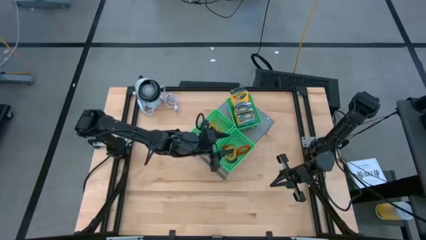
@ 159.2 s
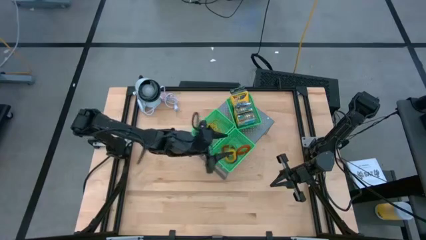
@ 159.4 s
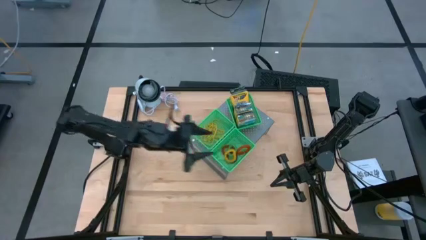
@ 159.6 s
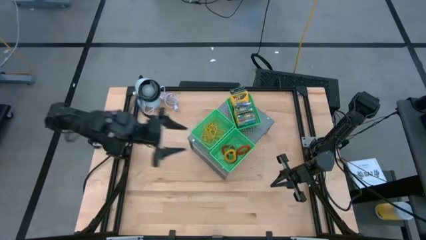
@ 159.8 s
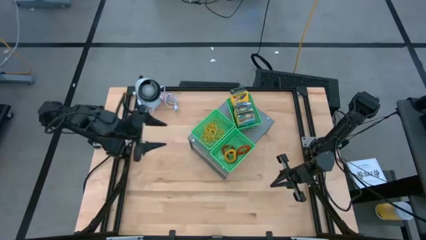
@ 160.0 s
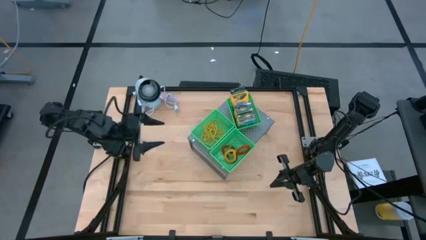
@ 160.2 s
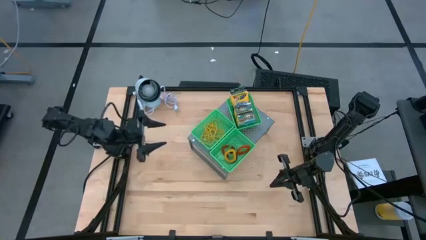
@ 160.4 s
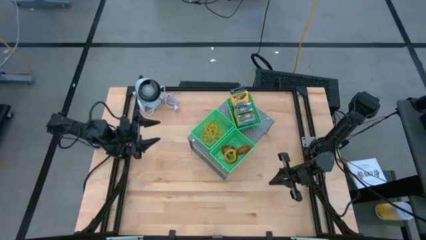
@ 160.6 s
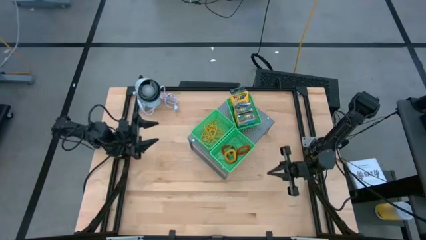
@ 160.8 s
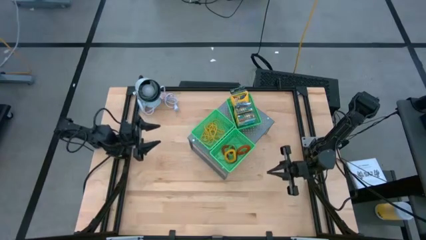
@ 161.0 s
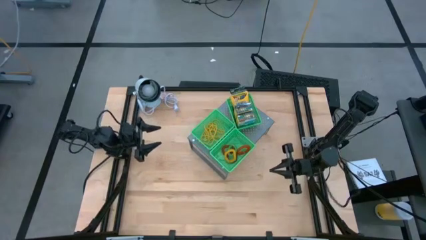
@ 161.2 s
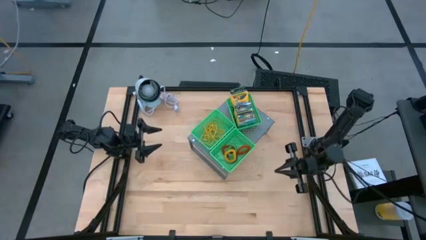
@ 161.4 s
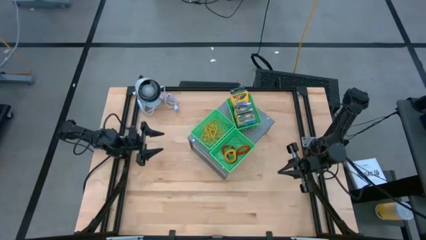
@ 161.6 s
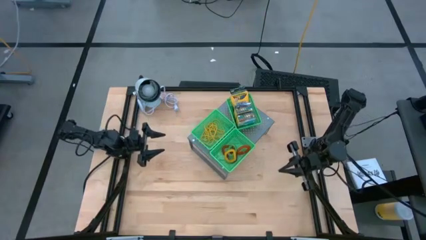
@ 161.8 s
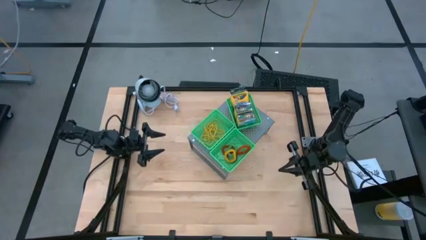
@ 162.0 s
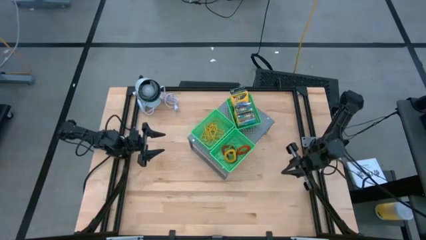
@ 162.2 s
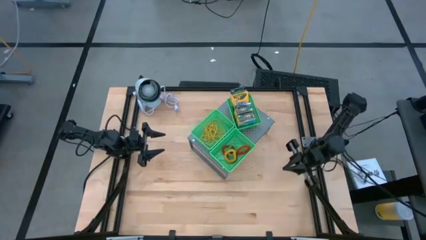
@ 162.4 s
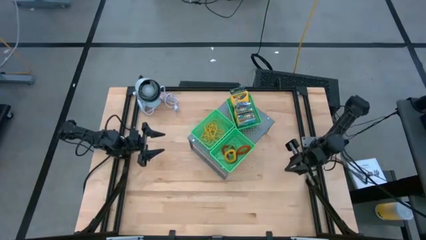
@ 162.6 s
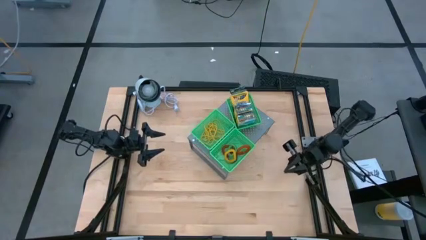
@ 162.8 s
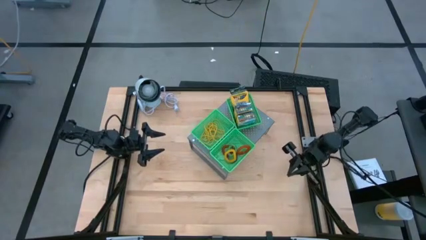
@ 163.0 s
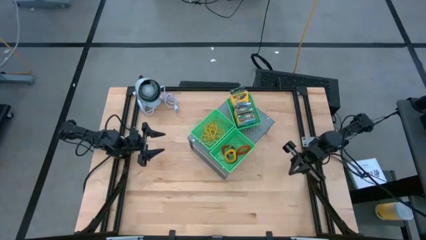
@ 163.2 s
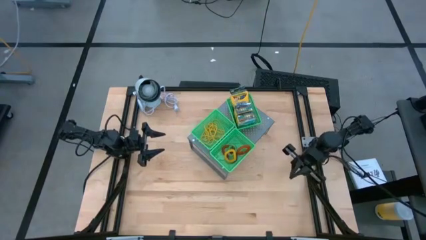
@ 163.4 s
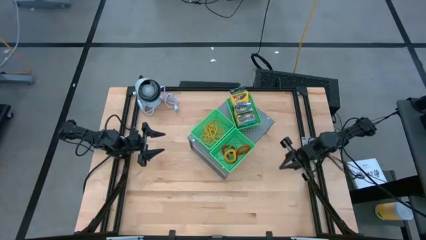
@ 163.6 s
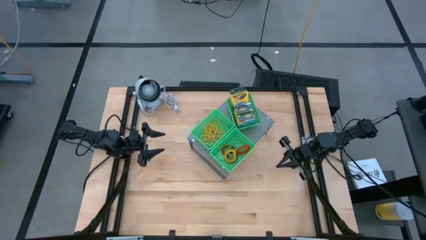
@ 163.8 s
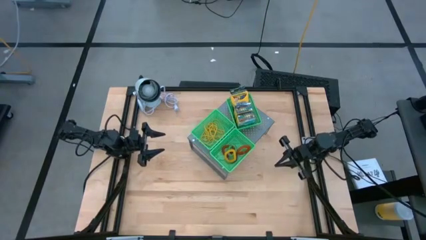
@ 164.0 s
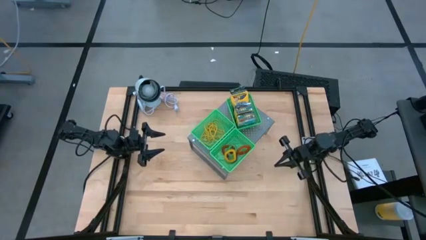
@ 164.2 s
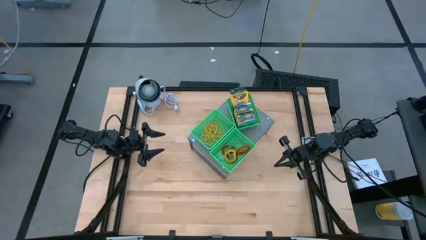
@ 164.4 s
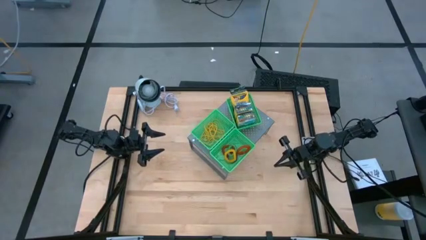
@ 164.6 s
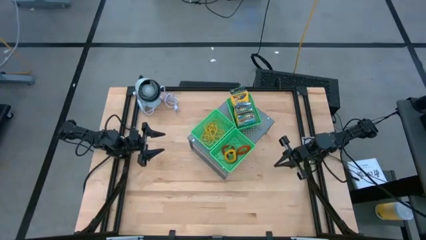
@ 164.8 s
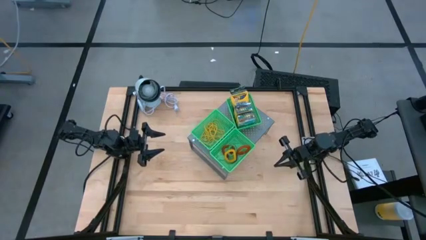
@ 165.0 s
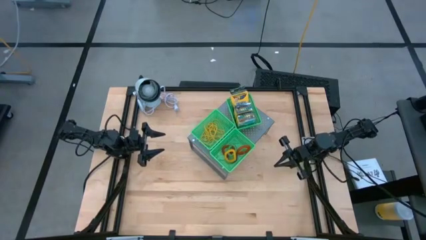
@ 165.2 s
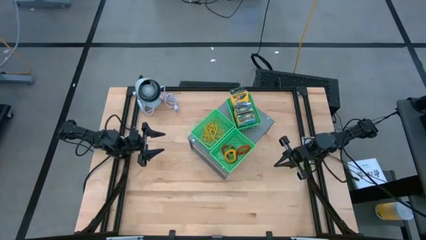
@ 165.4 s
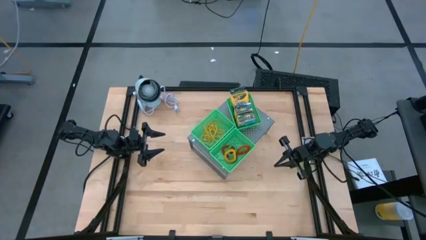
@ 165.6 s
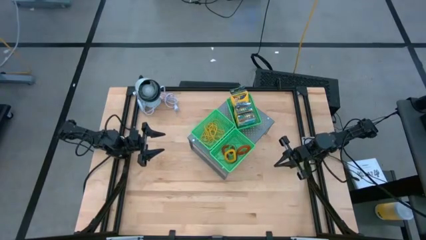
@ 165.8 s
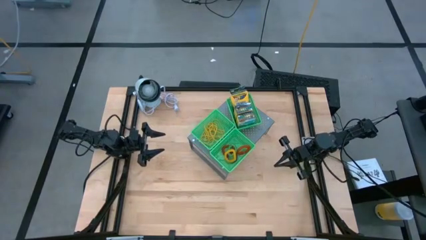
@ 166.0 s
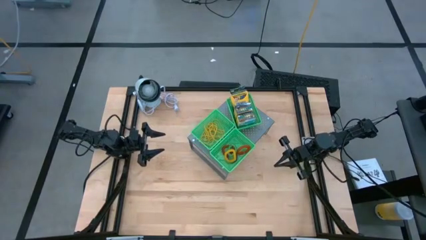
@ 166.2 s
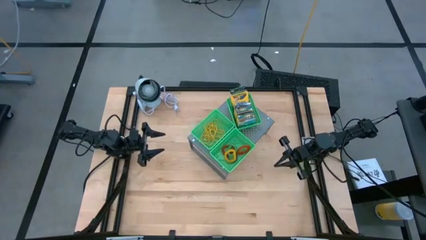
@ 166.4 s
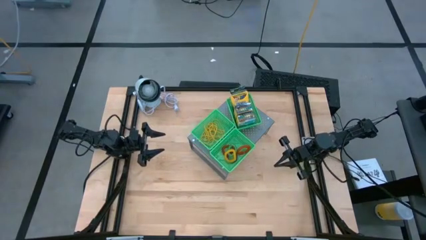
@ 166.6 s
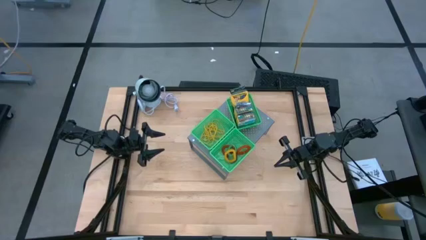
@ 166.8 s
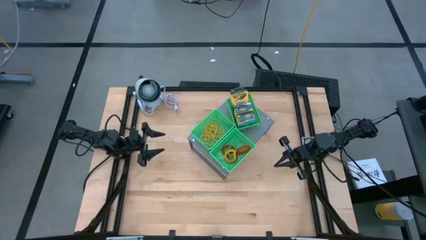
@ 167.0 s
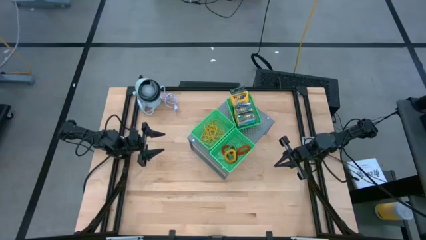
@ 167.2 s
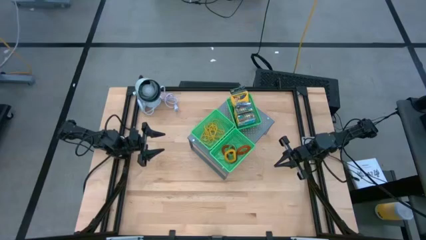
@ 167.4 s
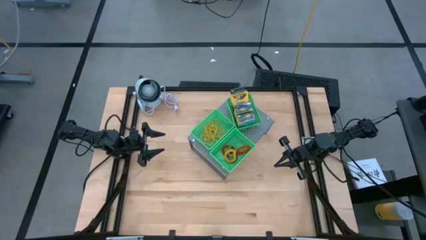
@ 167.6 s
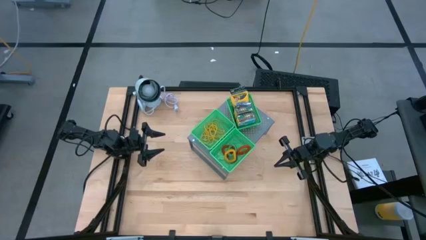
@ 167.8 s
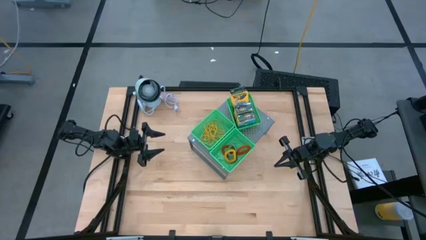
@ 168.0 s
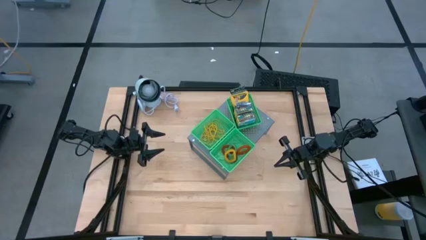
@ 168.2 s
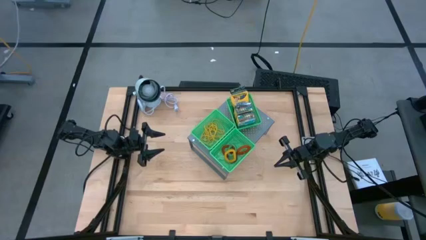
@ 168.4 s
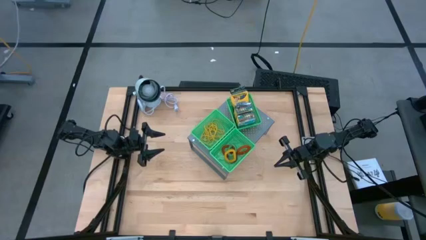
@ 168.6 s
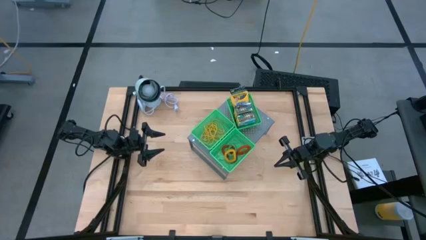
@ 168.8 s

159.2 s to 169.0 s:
Task: Pick & Place Office Desk Supplies
Return to Home Position

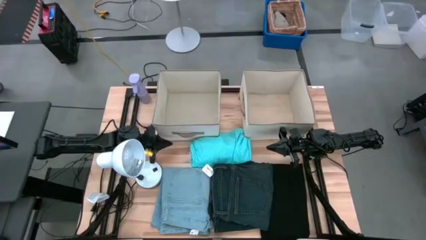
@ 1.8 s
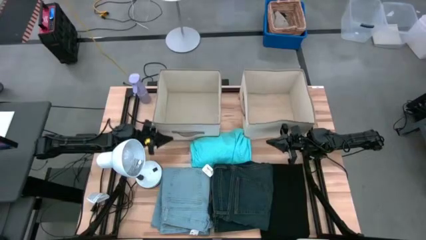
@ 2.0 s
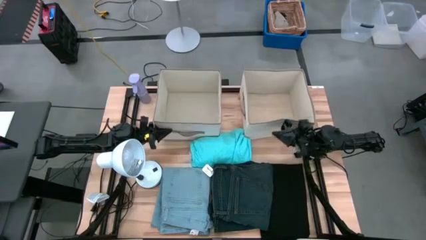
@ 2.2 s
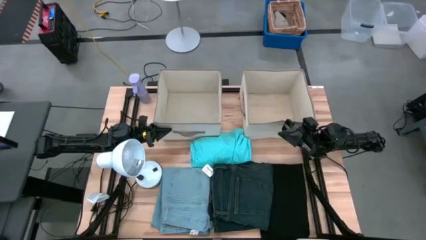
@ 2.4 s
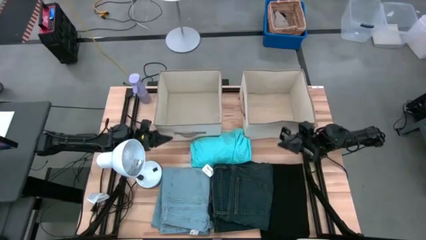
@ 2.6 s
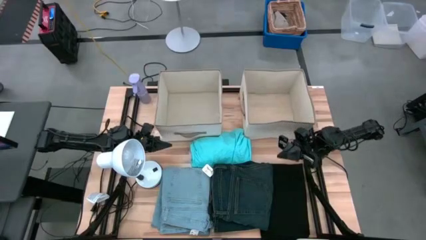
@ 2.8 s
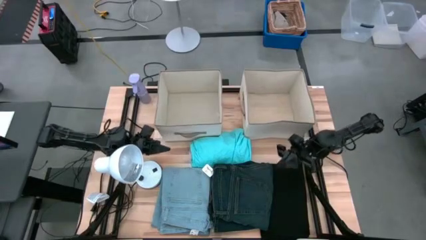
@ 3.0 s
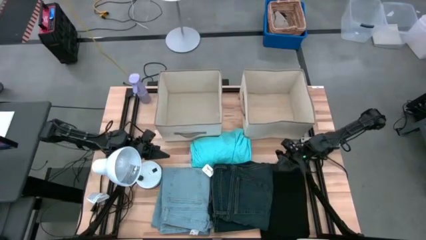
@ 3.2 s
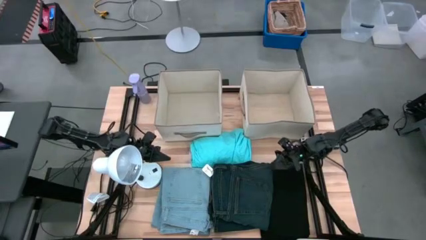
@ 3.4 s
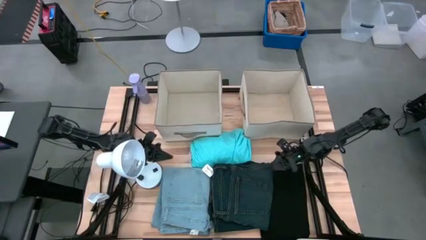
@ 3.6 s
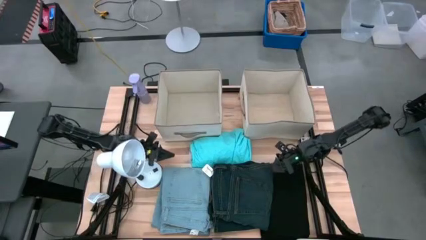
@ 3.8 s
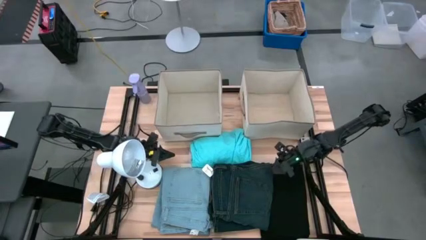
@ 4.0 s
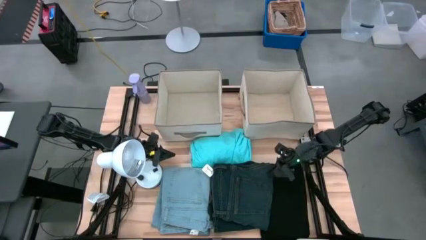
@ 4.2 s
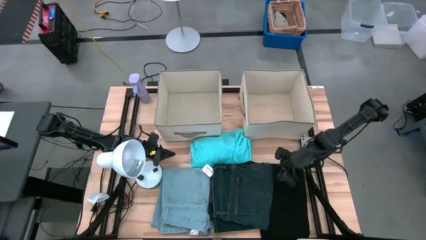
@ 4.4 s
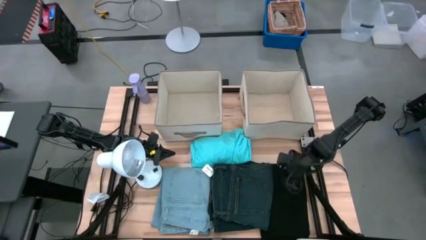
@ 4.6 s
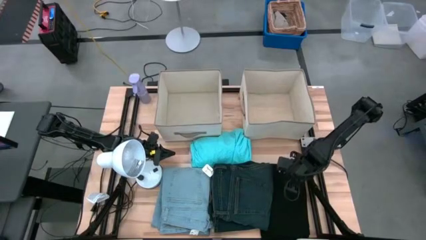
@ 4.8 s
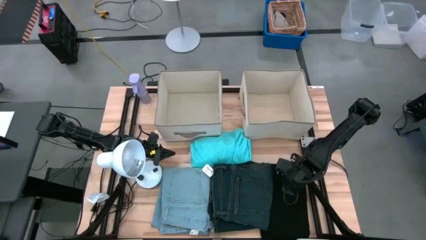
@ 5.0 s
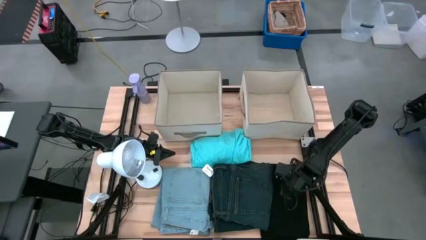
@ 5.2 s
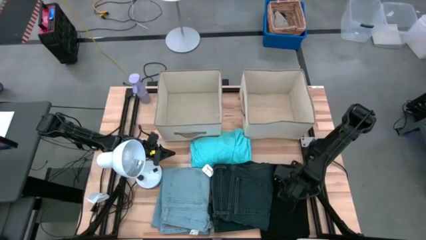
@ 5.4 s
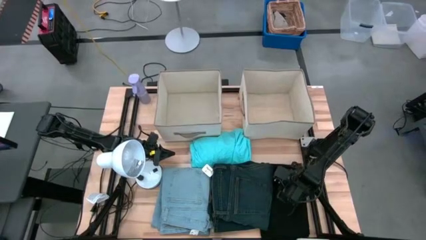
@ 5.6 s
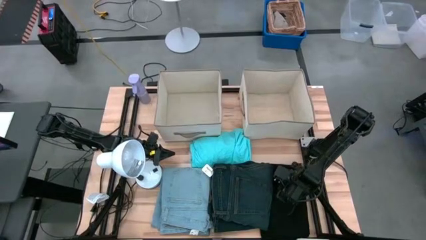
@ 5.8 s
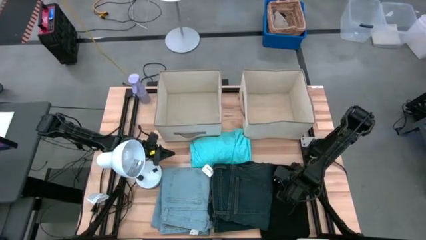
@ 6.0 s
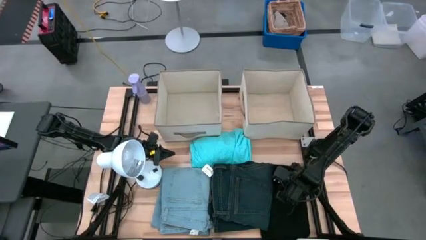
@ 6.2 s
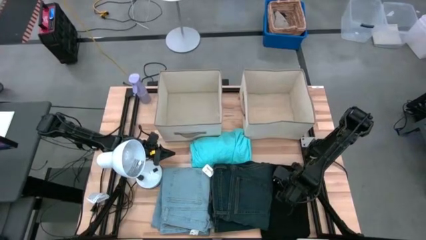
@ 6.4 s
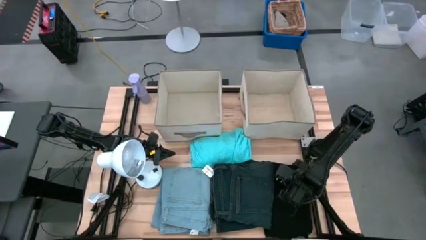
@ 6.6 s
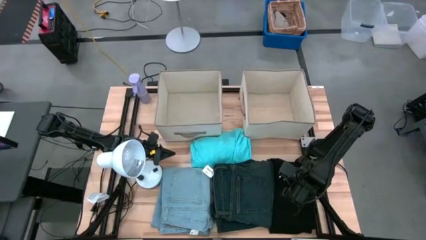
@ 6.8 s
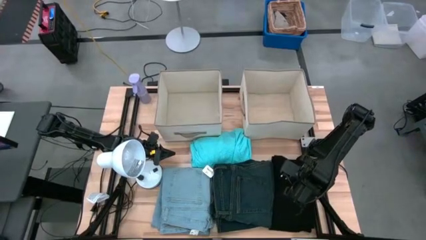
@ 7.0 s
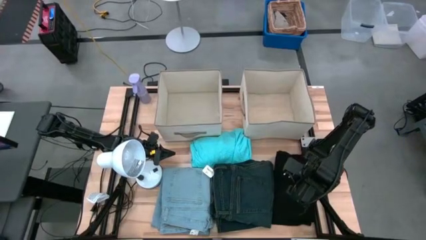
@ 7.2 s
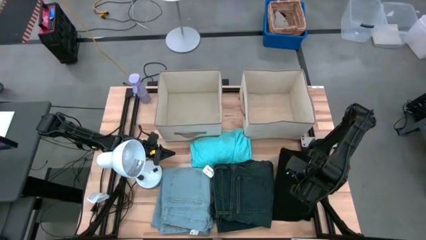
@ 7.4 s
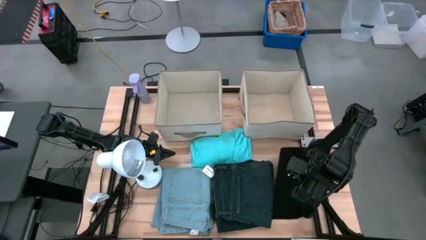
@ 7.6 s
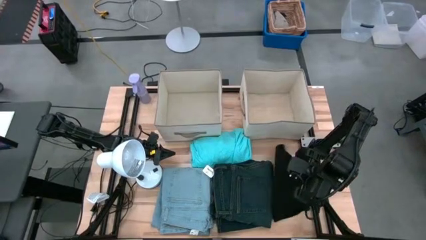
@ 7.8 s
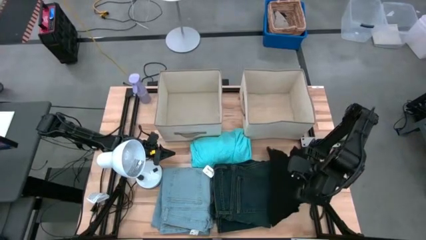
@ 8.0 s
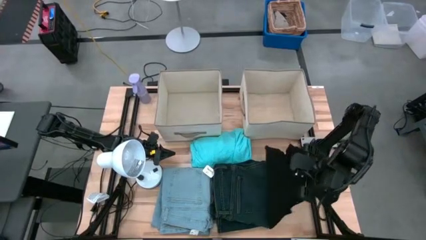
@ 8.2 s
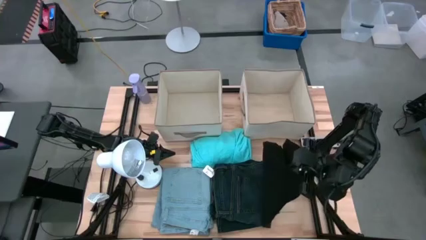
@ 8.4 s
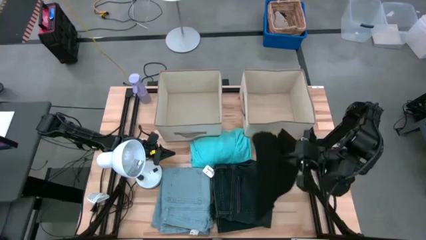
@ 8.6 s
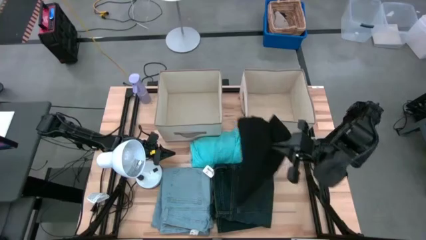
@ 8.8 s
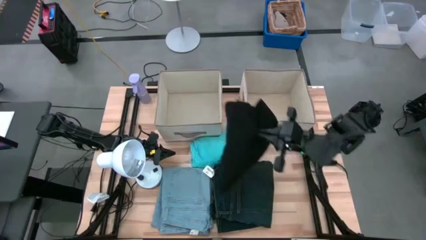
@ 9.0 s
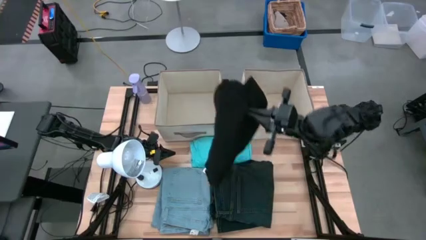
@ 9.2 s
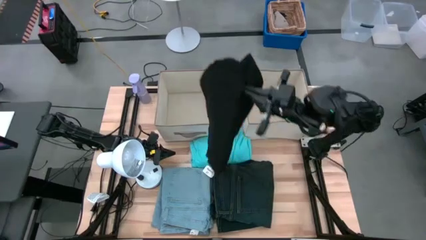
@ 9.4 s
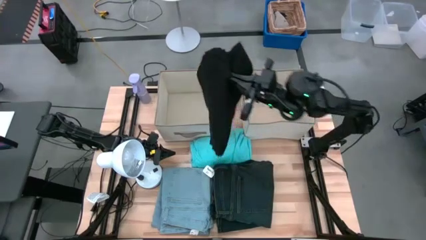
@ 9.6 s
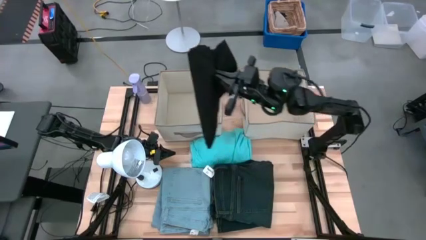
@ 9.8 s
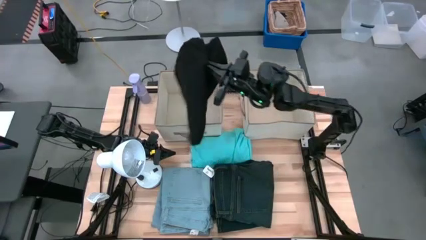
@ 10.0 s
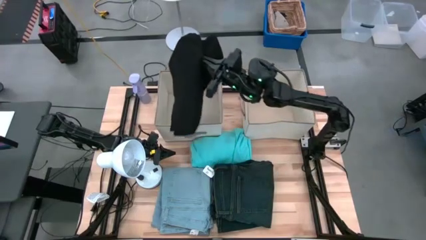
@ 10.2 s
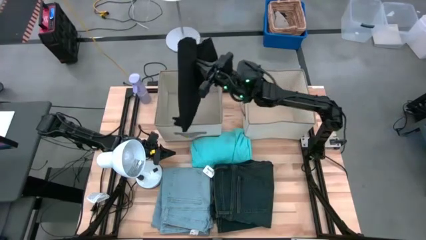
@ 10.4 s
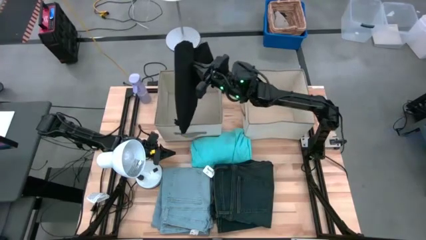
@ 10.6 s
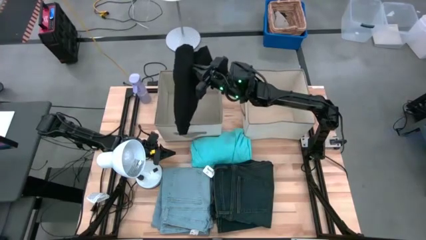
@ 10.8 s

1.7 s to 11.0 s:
Task: Sort clothes
Put the black pants into the left laundry organizer
